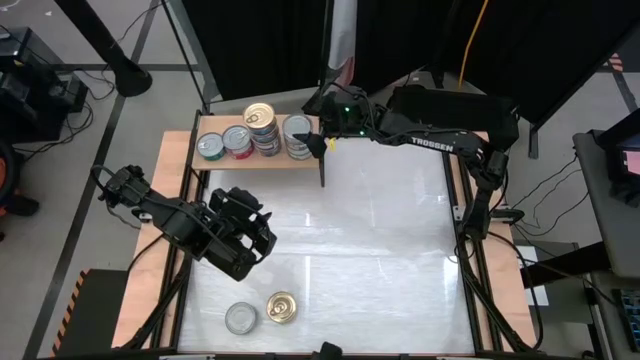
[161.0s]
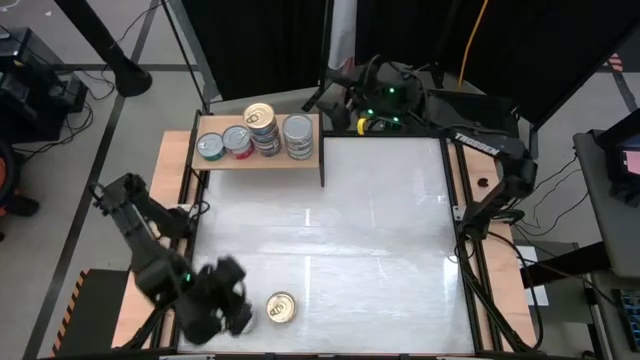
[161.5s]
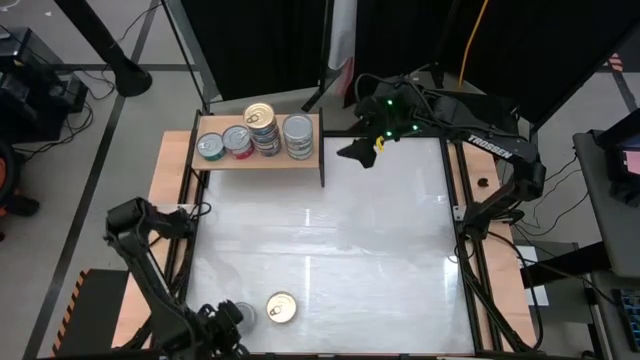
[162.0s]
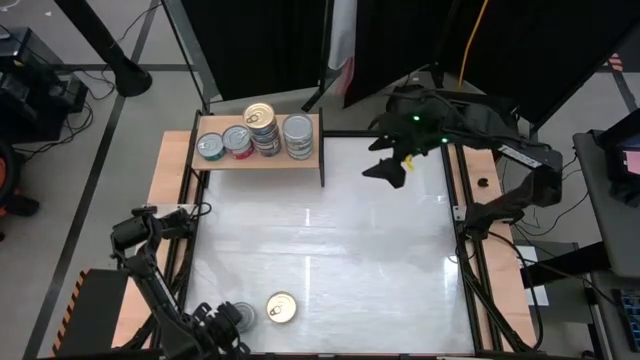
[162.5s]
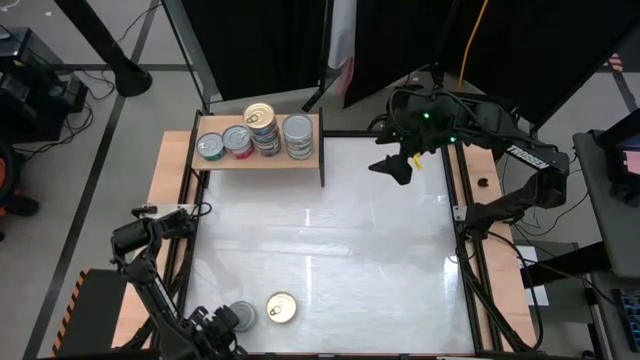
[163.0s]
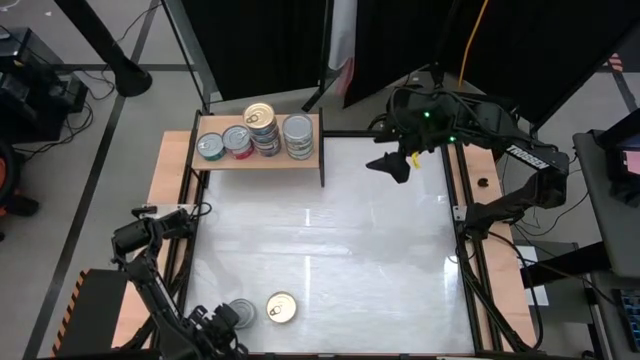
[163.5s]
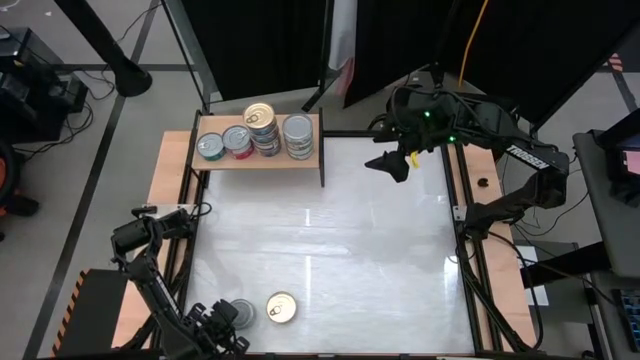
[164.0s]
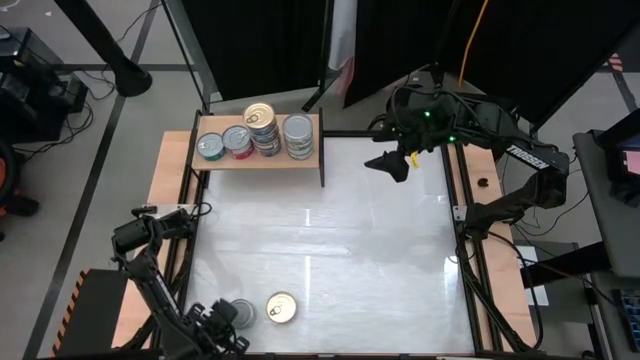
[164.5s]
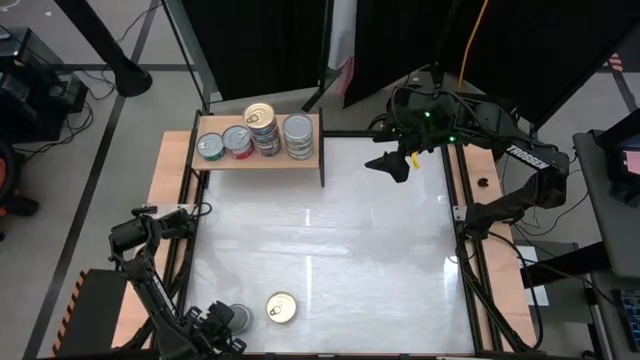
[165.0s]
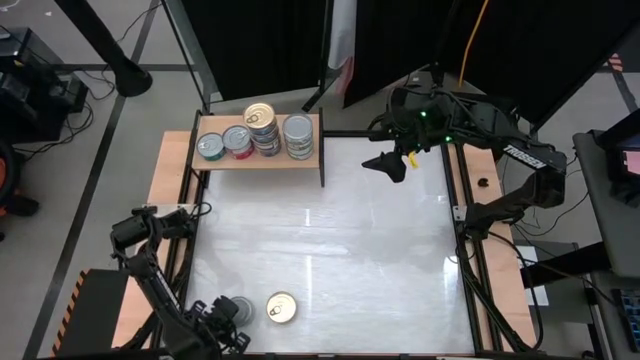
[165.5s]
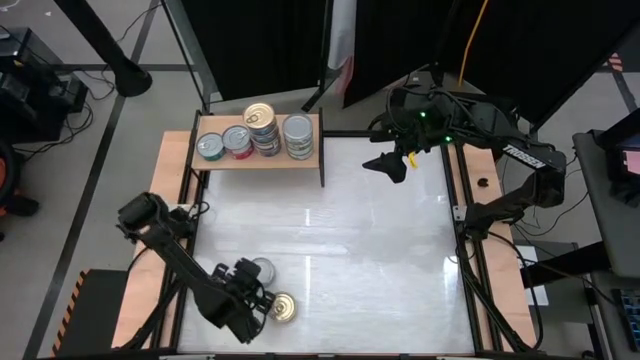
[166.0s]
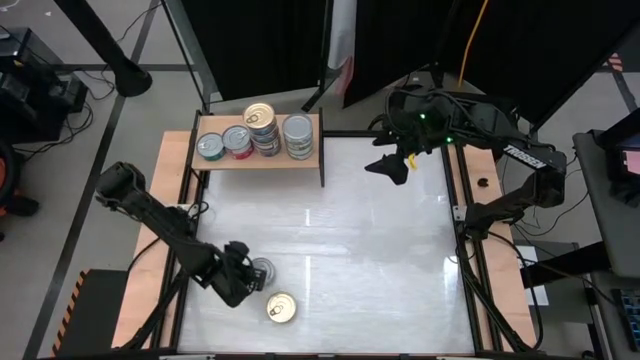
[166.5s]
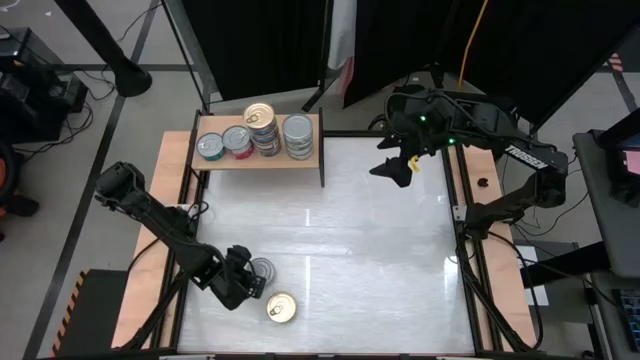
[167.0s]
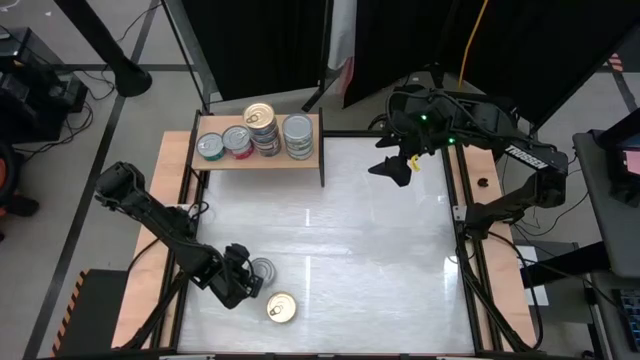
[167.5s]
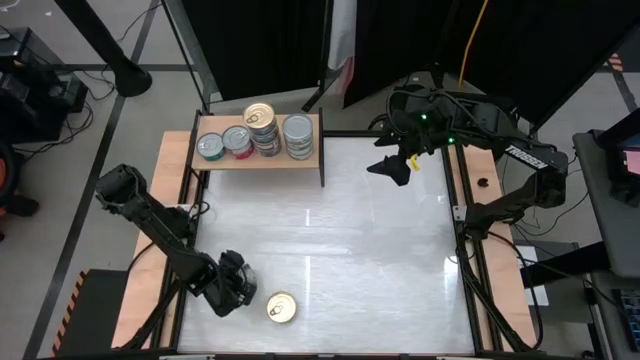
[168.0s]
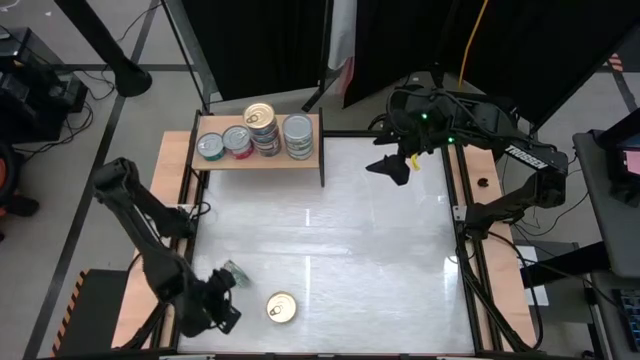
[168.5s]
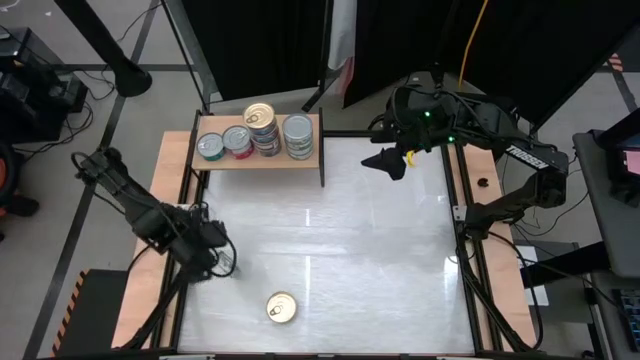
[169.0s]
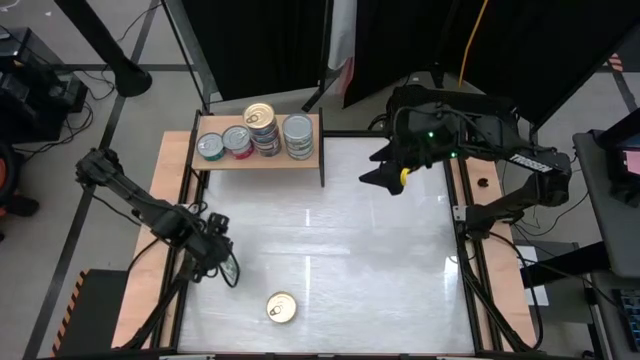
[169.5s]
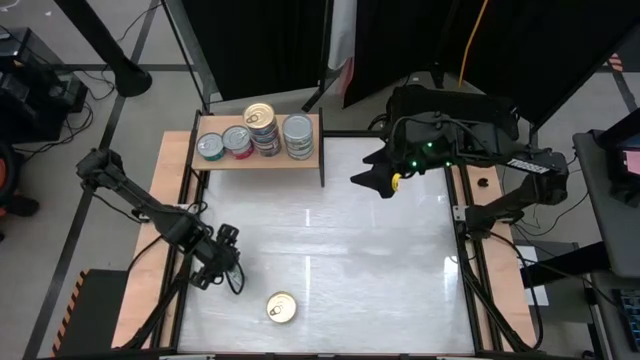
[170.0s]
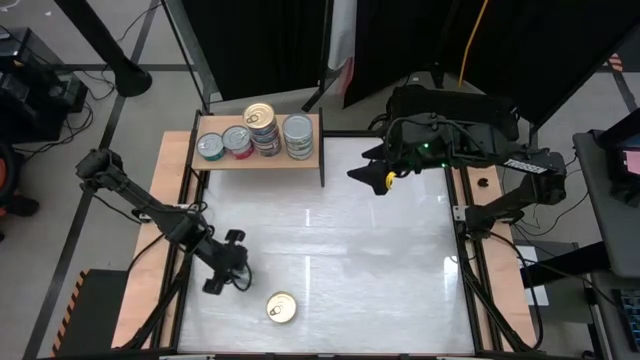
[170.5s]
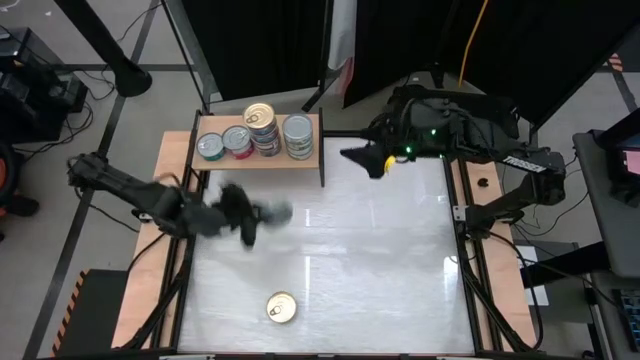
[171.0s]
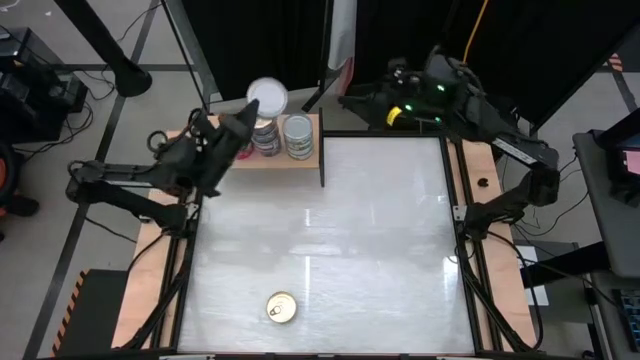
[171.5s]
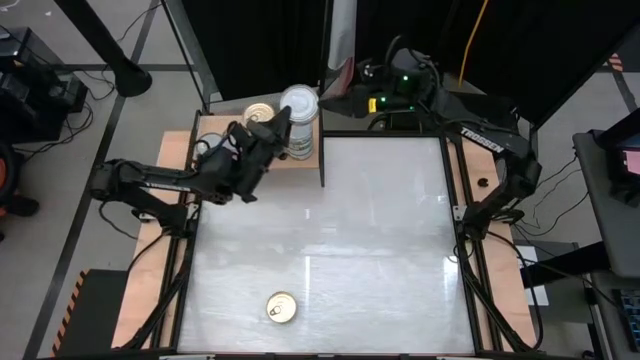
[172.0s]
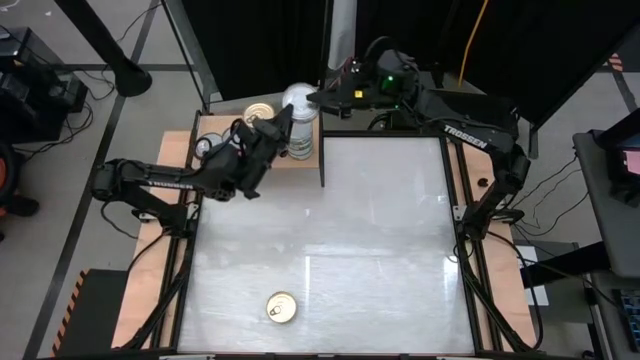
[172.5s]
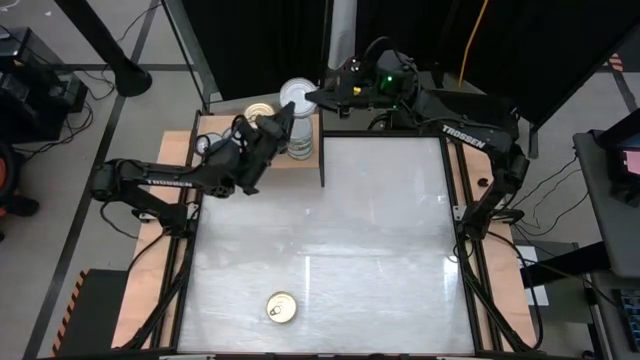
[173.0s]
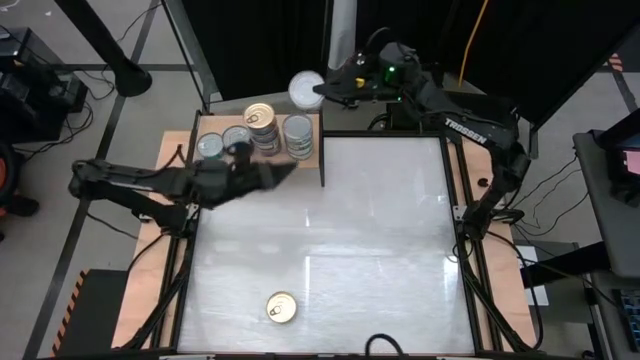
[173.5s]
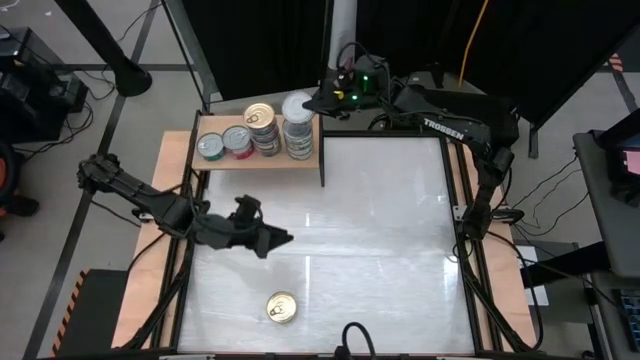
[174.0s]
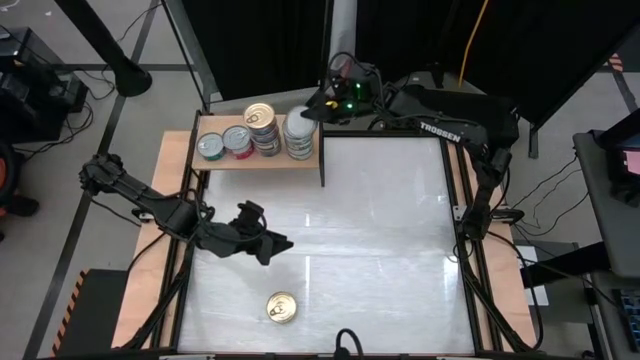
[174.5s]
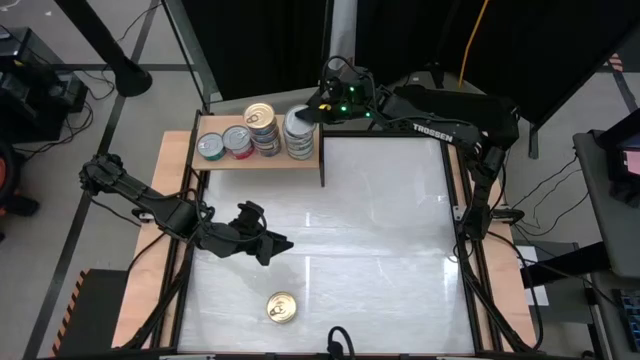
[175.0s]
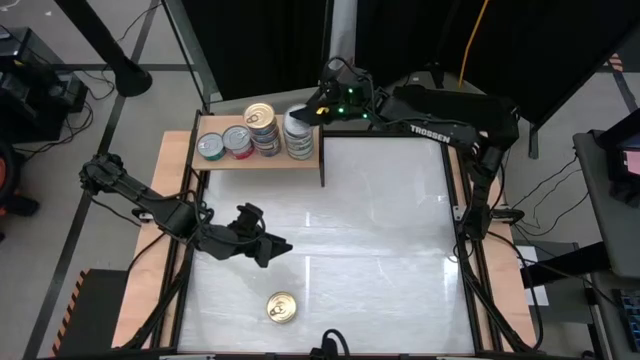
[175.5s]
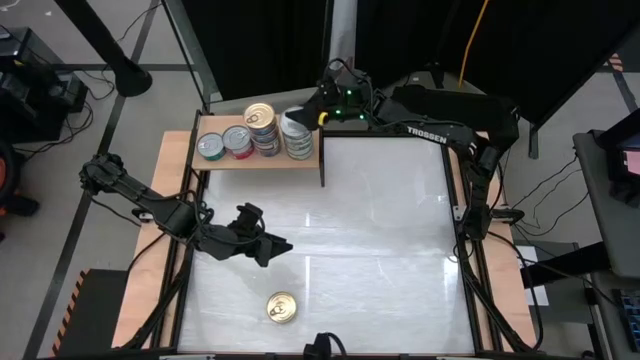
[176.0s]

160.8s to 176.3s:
Task: Stack canned seafood by type on shelf
Stack the green white tuna can on top of the green white tuna cans on the shelf

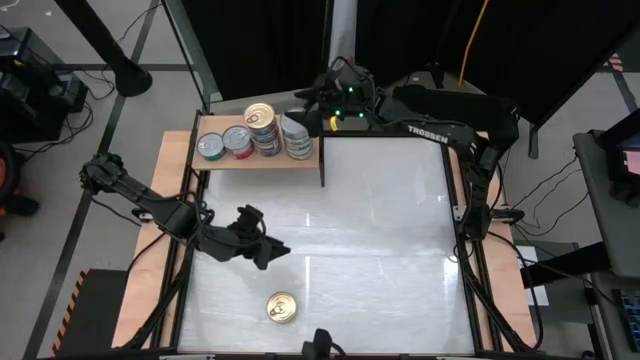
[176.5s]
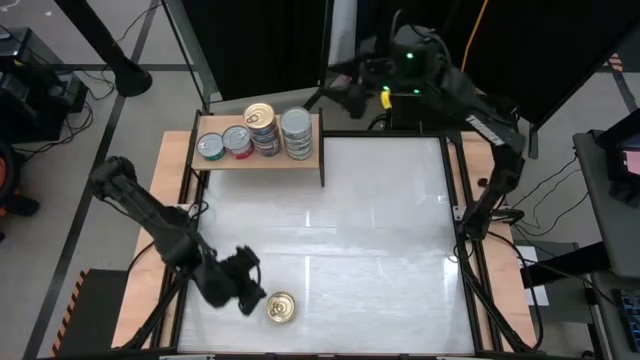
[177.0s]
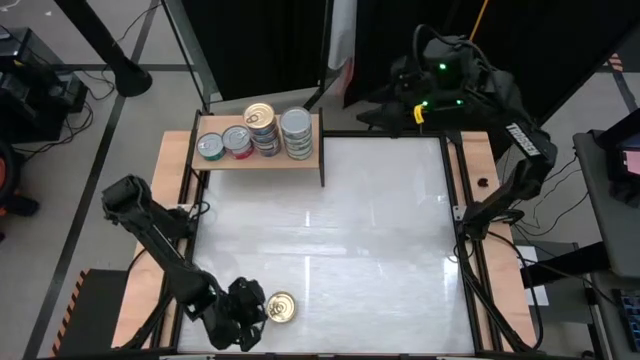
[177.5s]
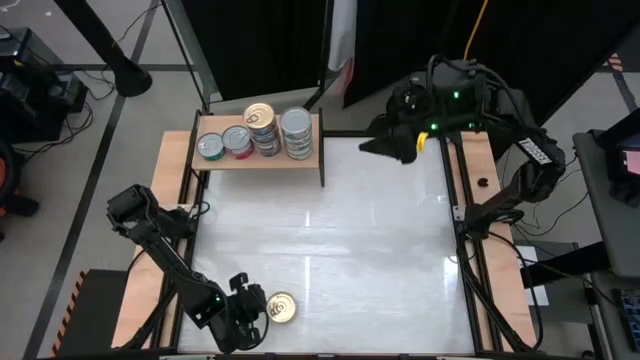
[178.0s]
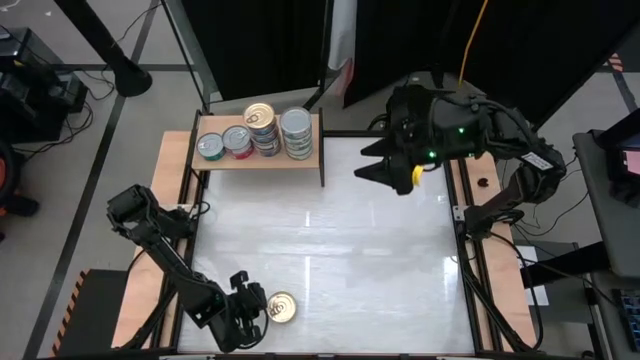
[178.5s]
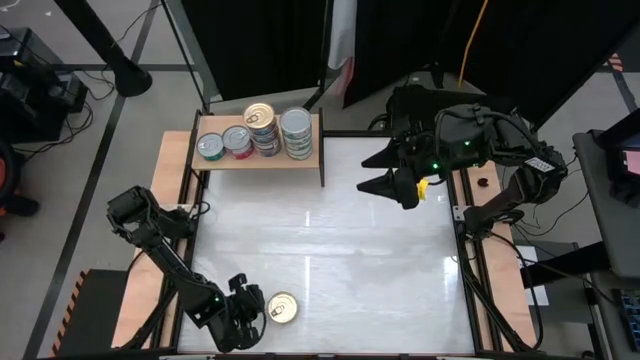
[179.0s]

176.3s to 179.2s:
Stack the blue pink tuna can on top of the blue pink tuna cans on the shelf

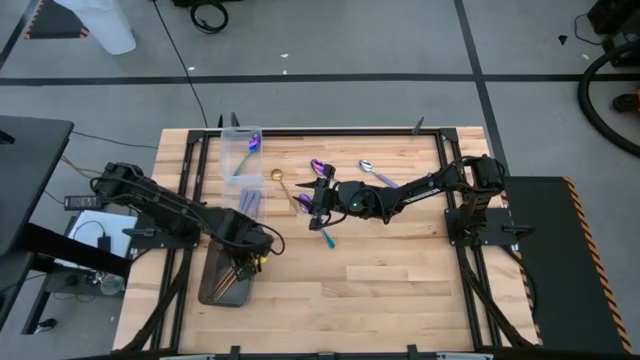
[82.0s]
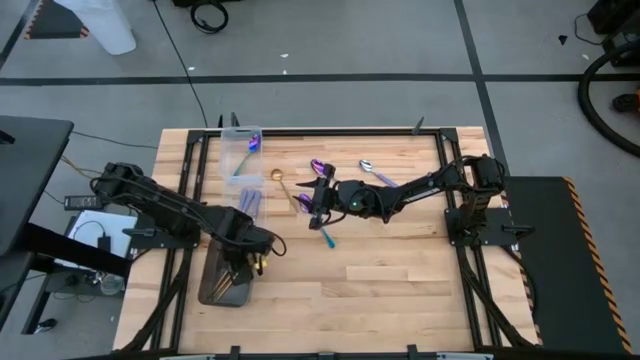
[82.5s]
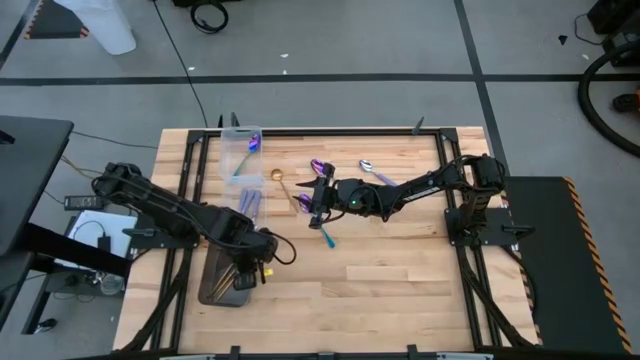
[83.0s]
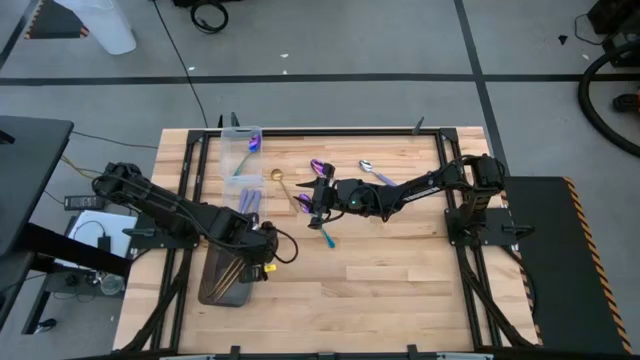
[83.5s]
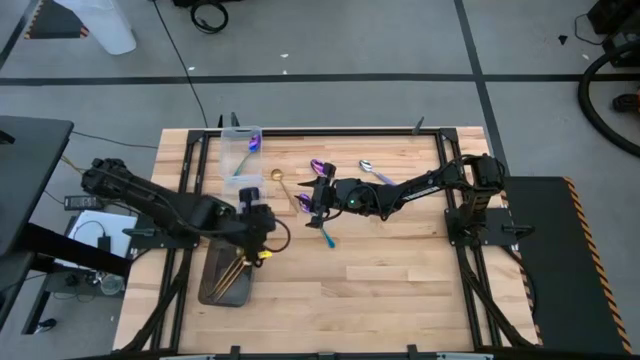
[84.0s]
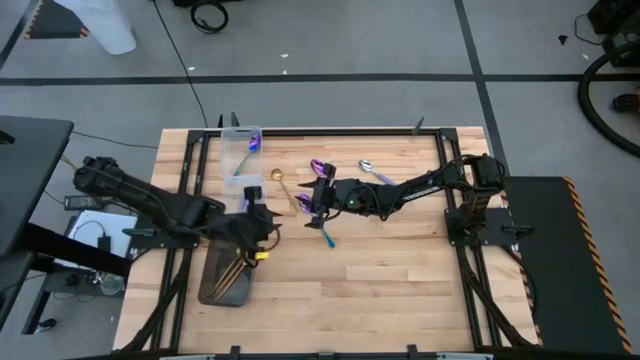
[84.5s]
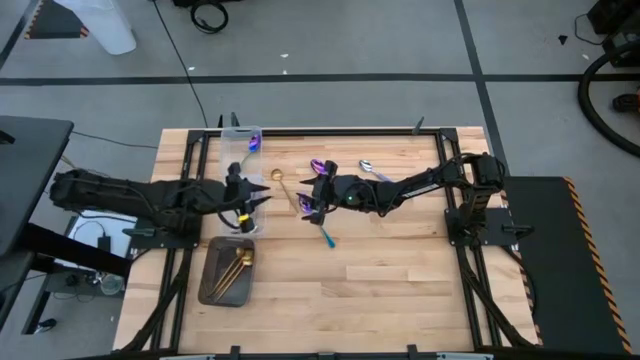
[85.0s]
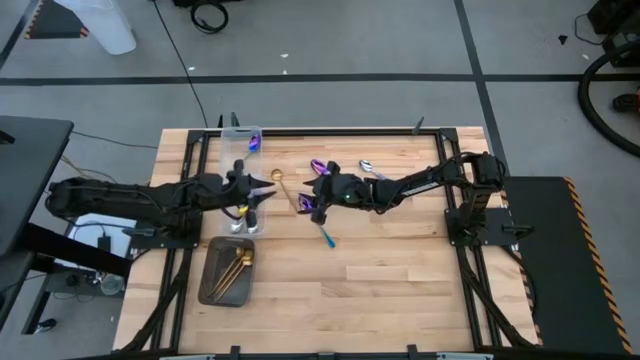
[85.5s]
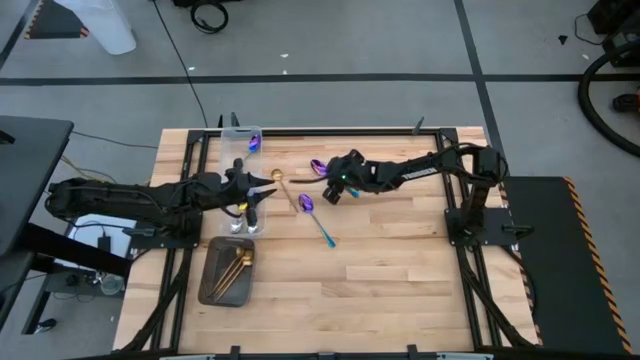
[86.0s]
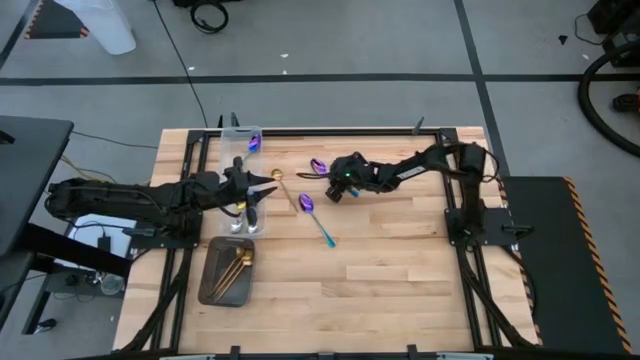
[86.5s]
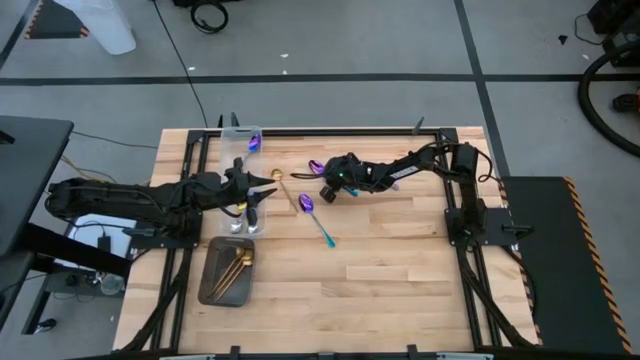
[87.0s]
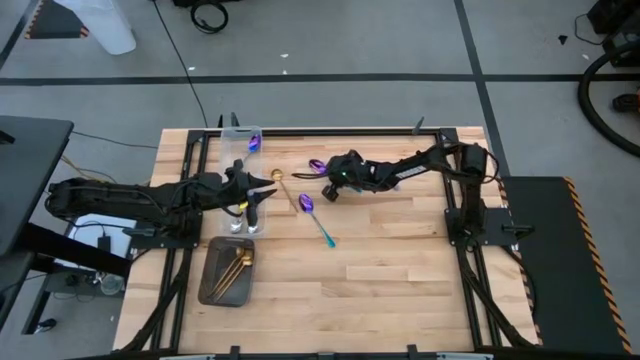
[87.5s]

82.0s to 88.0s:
Task: Sort silverware by color (type)
Put the purple spoon into the top transparent bin
